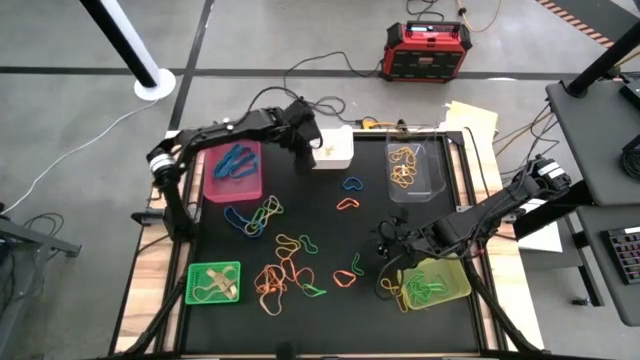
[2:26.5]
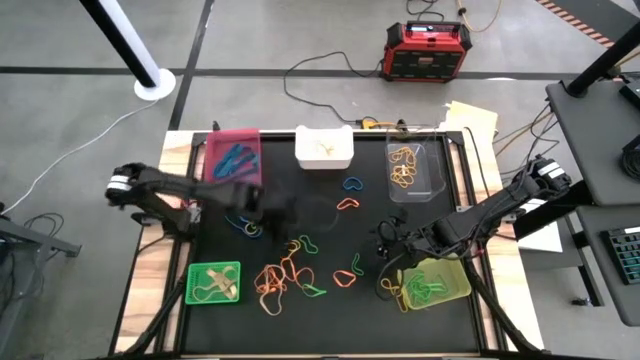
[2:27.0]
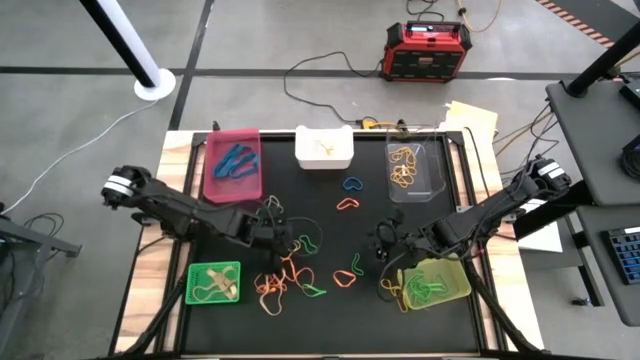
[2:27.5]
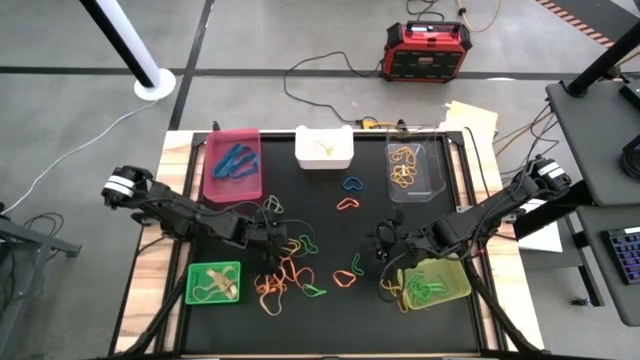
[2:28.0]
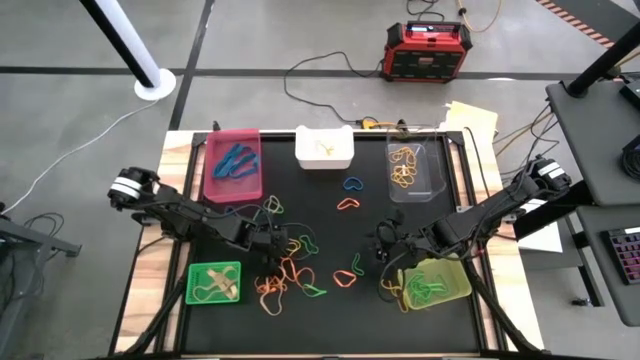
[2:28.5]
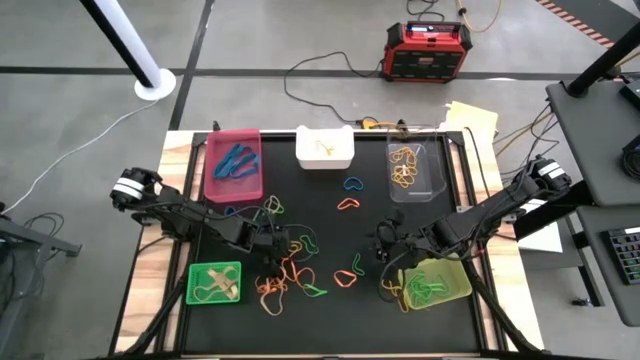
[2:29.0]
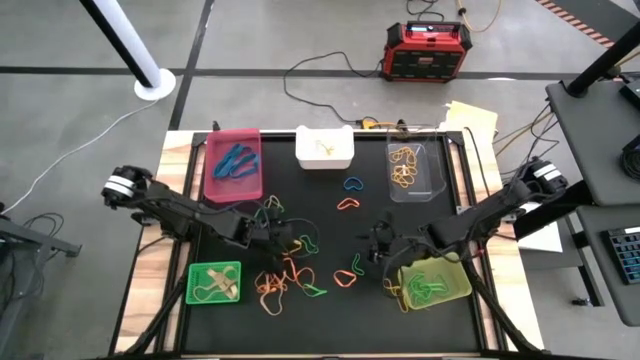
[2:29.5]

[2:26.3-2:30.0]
Task: Sort rubber bands into baskets
Put the yellow rubber band into the transparent bin

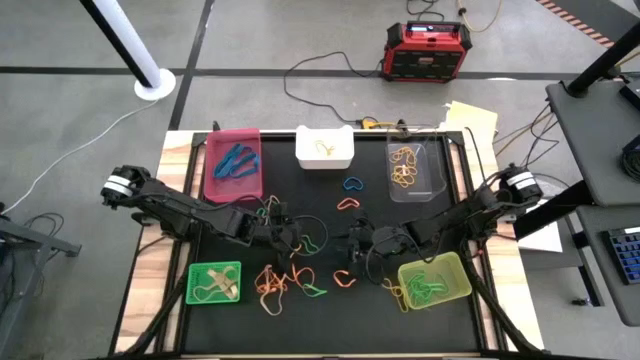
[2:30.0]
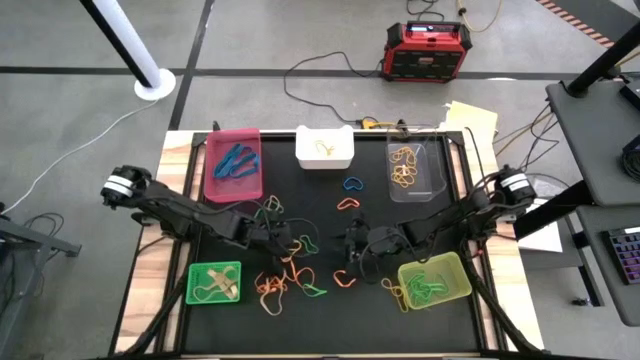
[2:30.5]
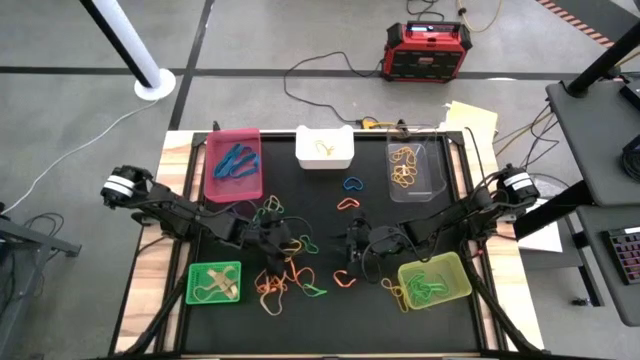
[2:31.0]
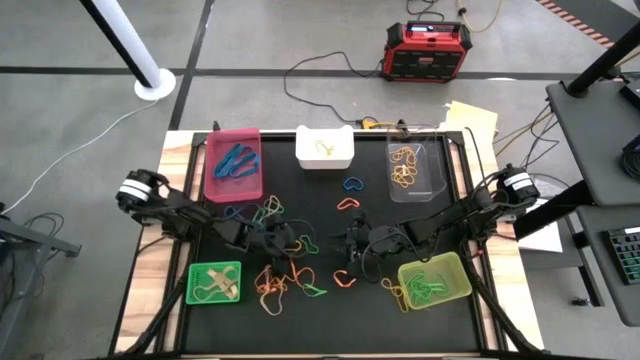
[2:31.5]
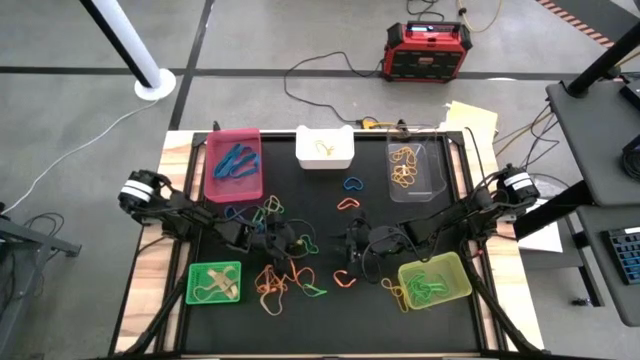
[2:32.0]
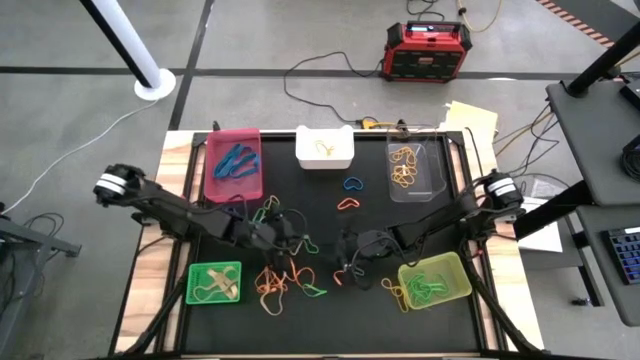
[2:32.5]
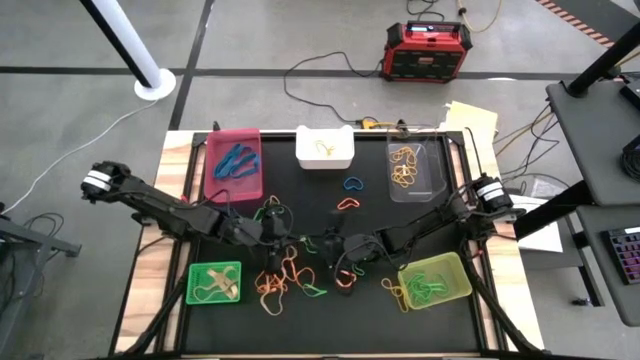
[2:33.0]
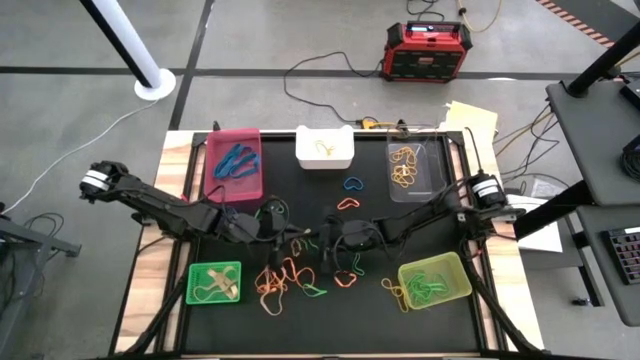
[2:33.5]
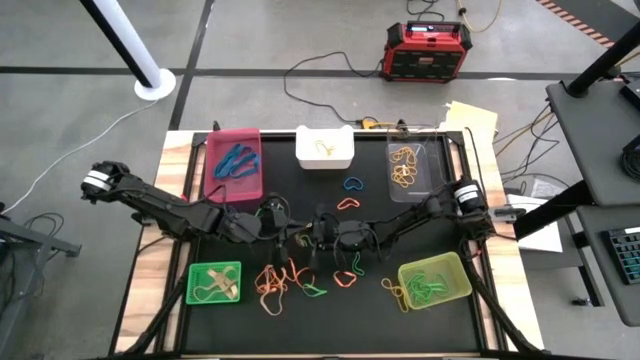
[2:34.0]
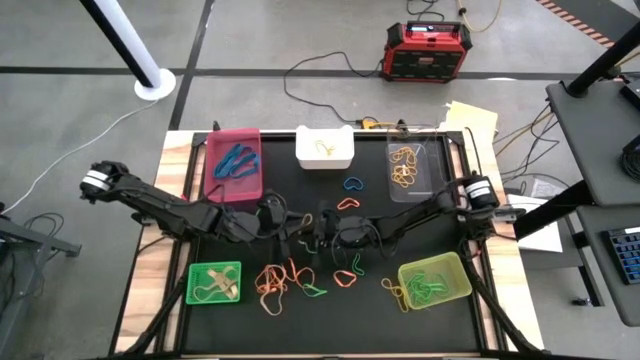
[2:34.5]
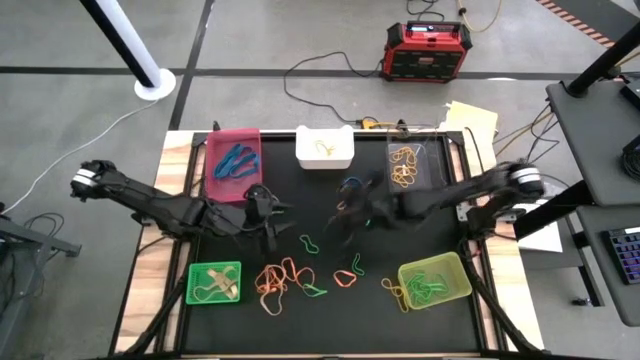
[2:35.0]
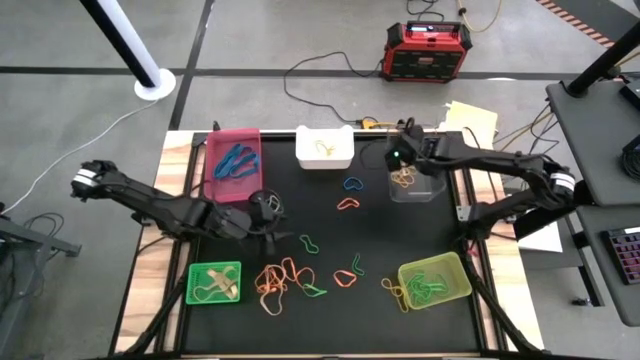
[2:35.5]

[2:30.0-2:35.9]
Put the yellow rubber band into the transparent bin

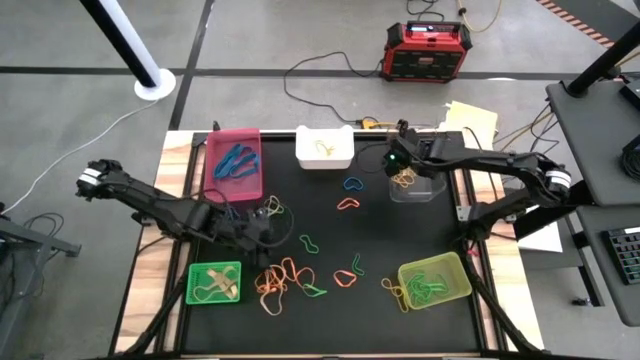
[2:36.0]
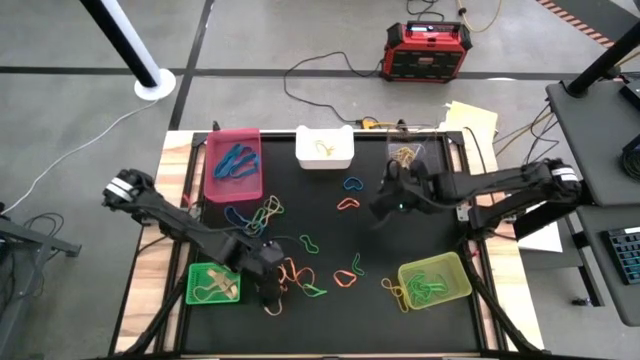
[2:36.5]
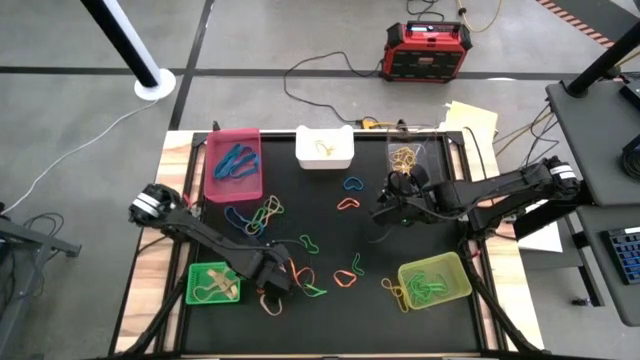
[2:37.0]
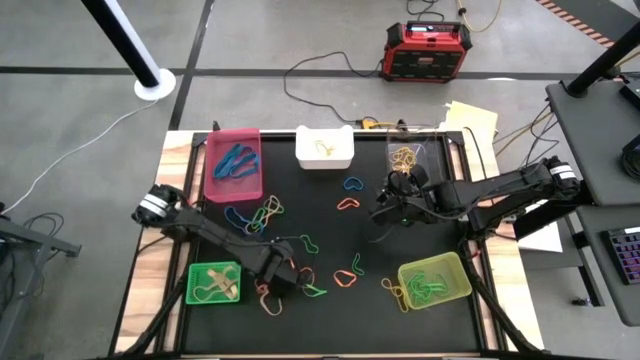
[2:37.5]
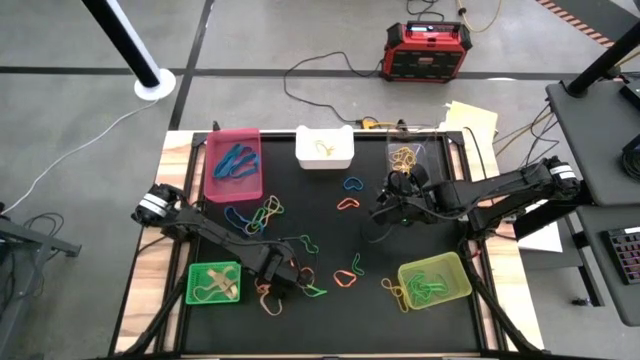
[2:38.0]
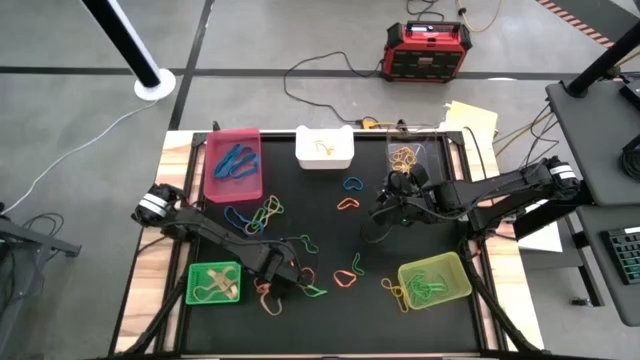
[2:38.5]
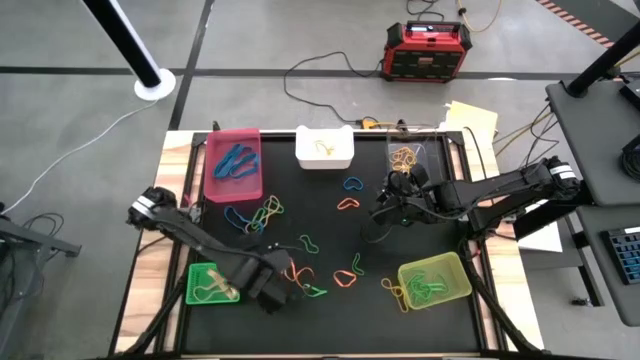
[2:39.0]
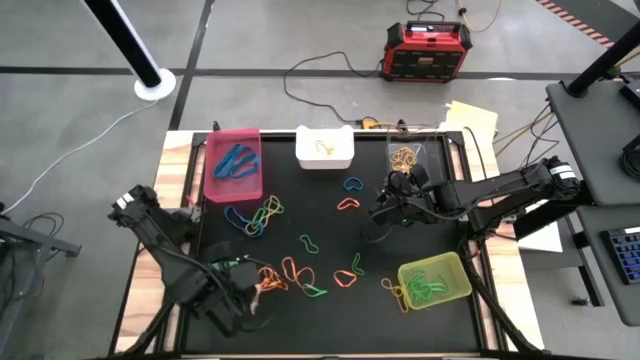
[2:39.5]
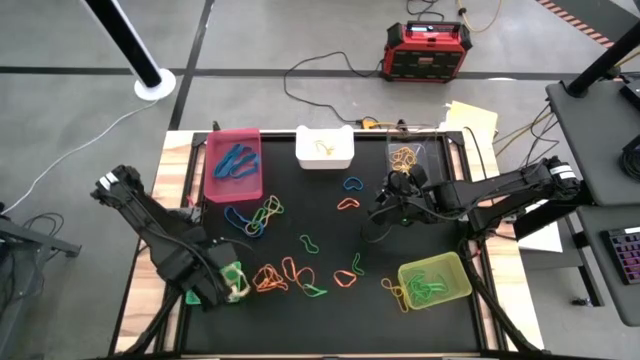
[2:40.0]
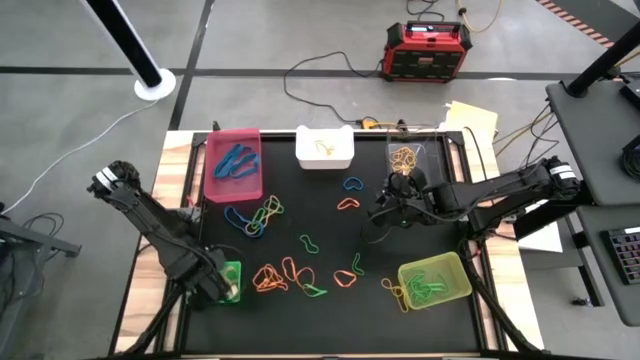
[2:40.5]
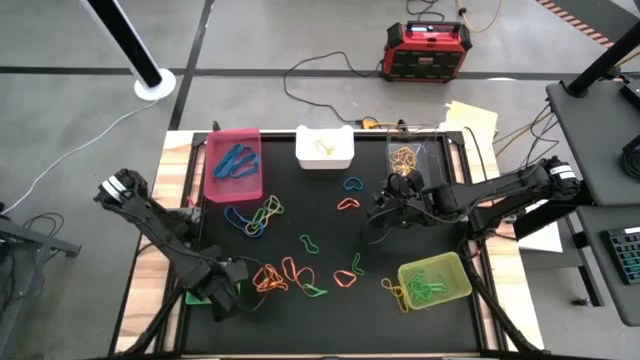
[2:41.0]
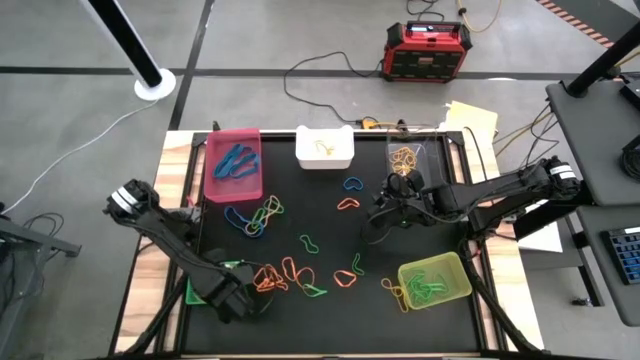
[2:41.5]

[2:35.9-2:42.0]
Put the light yellow rubber band into the green bin

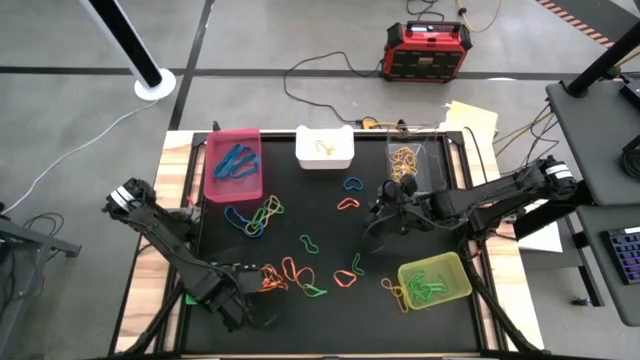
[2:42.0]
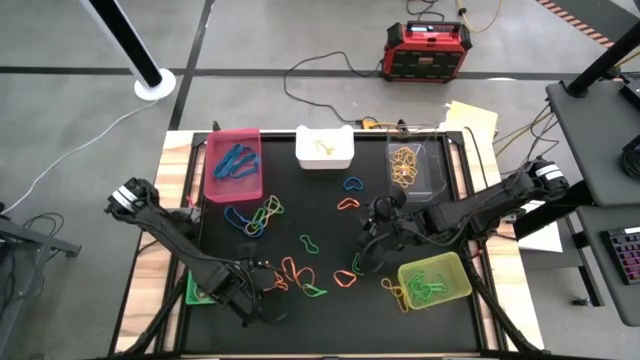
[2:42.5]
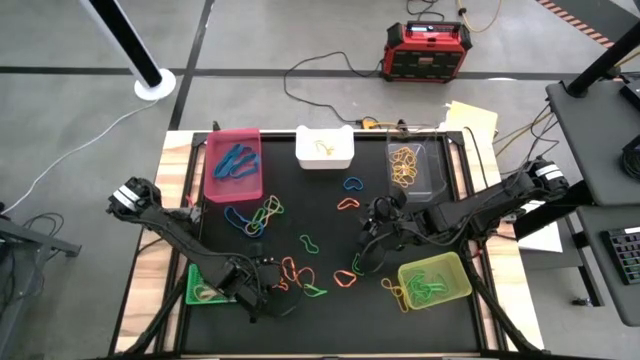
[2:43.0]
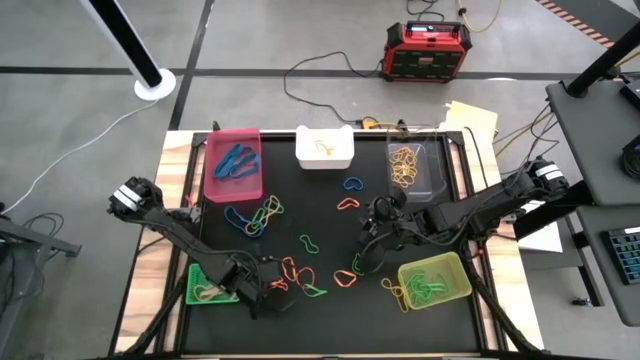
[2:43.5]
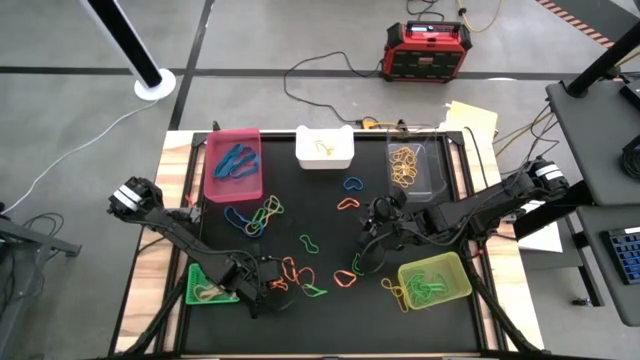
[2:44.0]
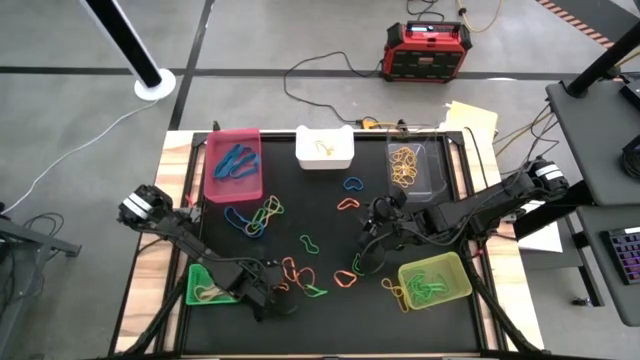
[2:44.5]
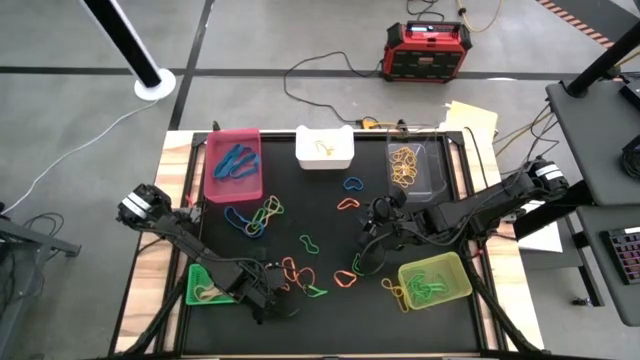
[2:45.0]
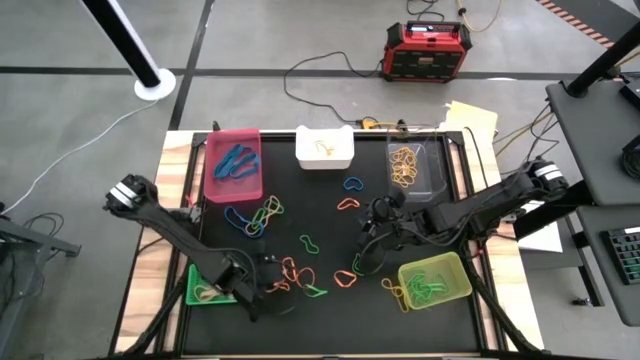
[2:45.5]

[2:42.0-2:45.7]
Put the orange rubber band into the white bin

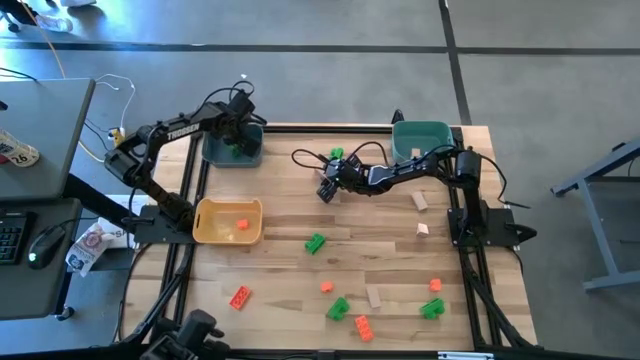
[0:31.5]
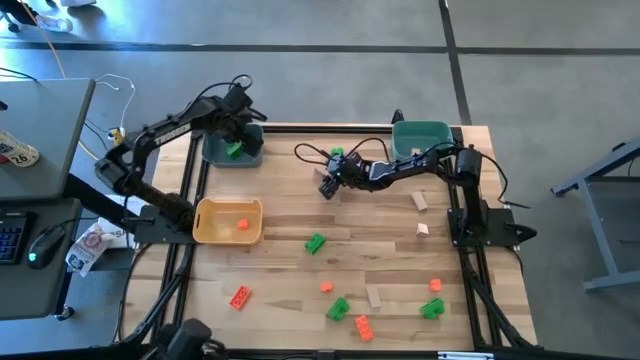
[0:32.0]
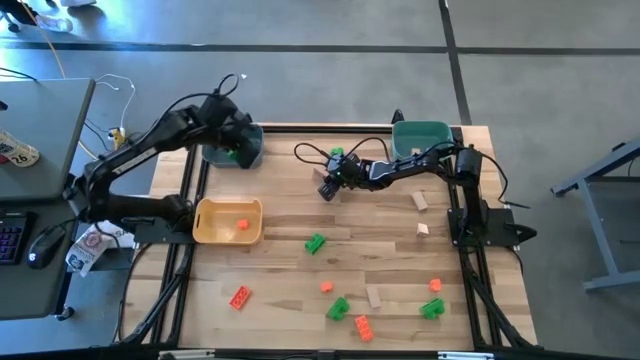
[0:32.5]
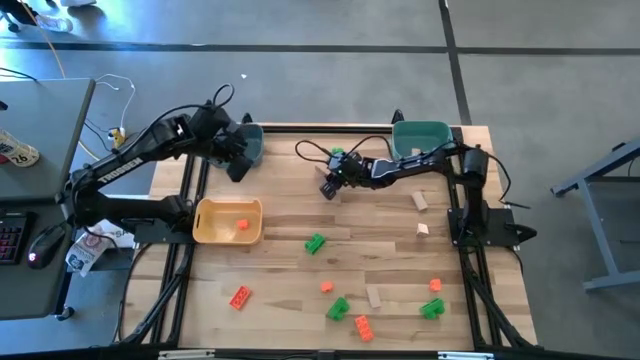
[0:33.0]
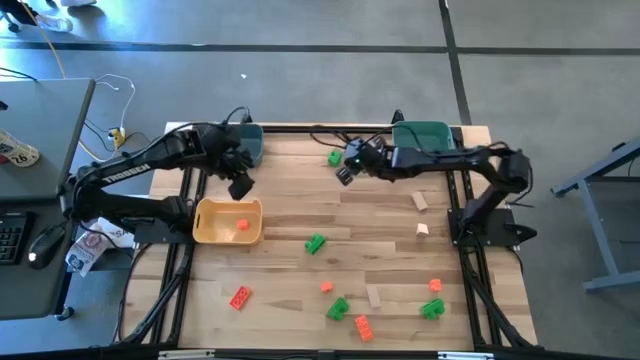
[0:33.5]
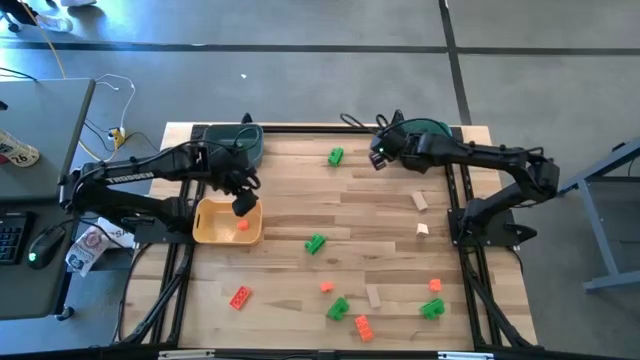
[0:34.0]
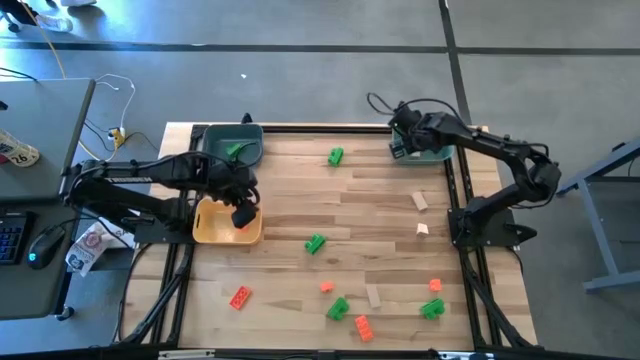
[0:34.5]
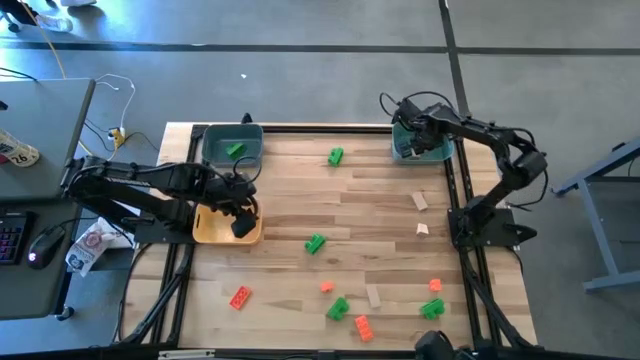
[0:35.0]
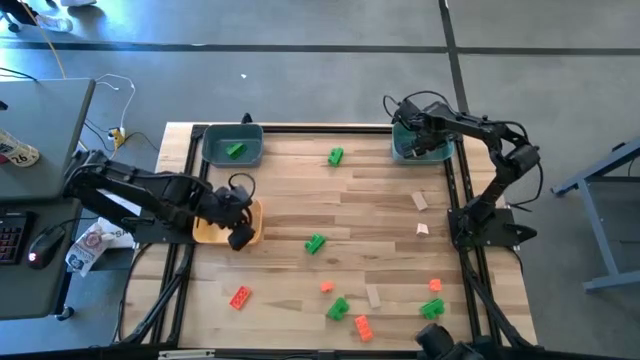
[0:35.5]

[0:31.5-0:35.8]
Task: Sort & place blocks by color
Put the brown block into the green bin
